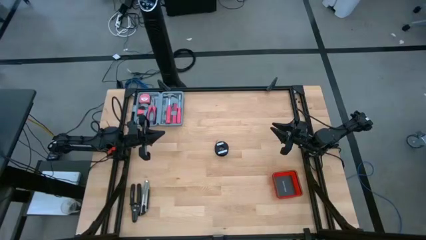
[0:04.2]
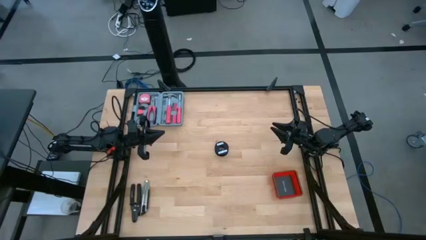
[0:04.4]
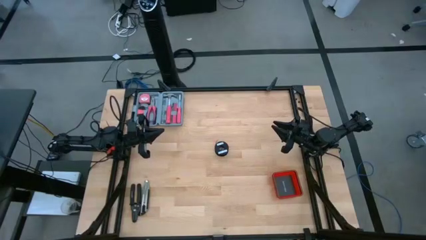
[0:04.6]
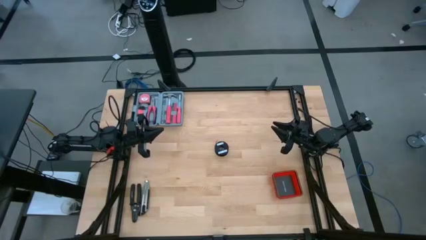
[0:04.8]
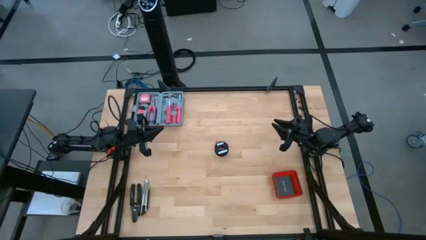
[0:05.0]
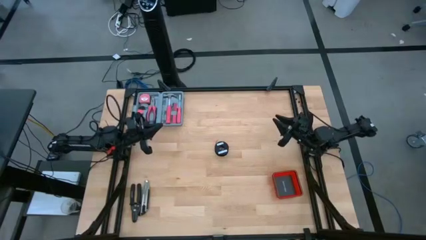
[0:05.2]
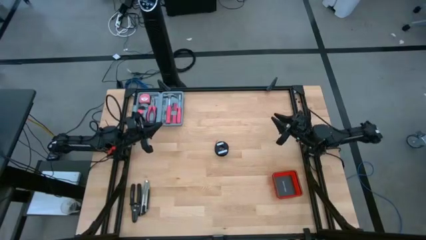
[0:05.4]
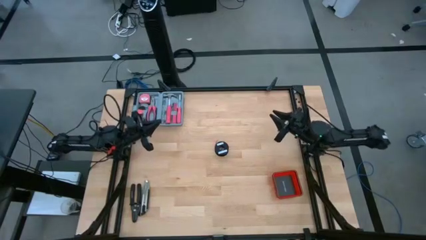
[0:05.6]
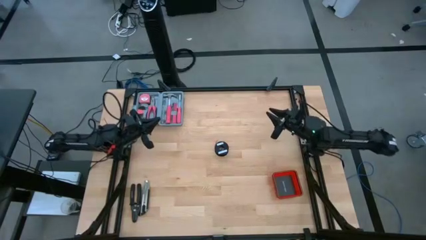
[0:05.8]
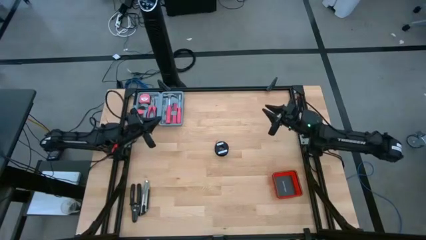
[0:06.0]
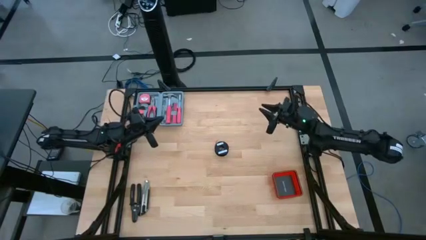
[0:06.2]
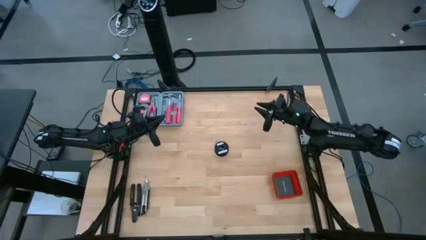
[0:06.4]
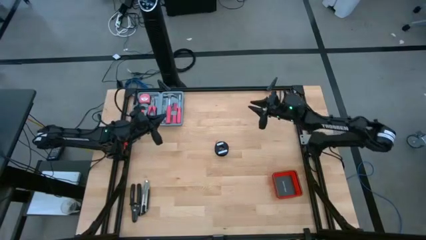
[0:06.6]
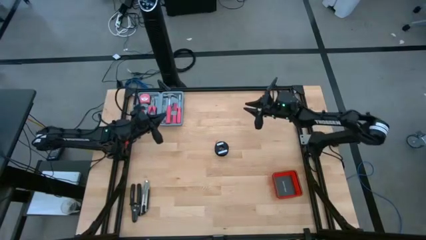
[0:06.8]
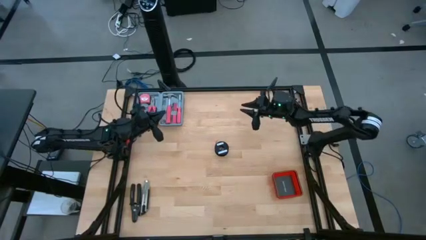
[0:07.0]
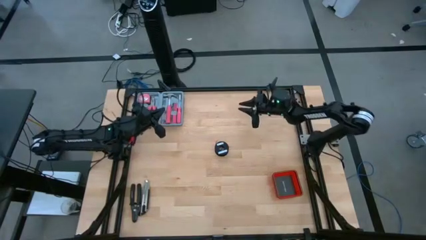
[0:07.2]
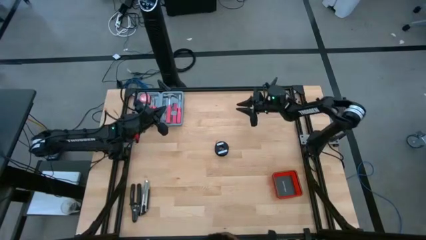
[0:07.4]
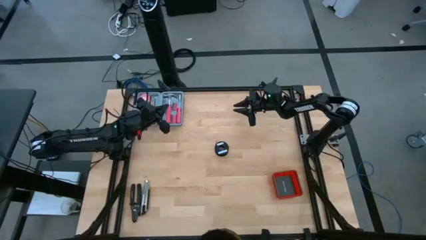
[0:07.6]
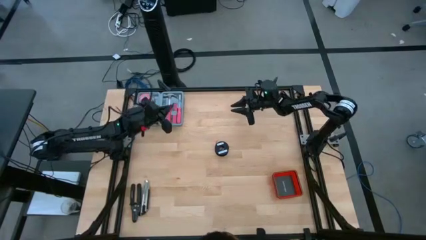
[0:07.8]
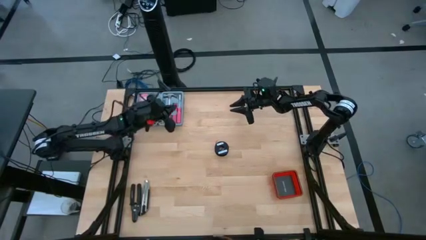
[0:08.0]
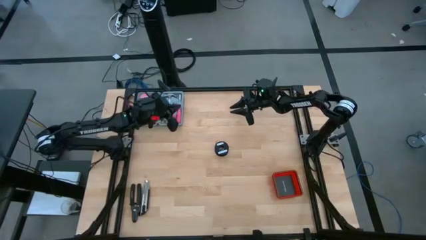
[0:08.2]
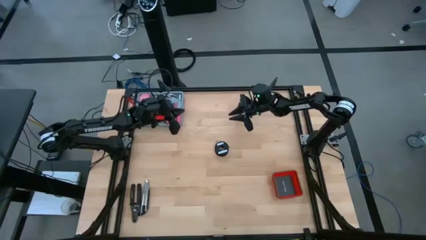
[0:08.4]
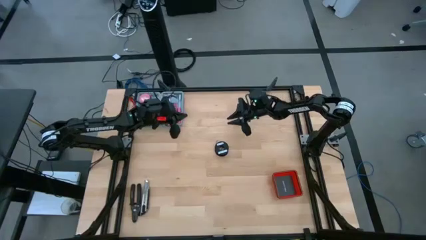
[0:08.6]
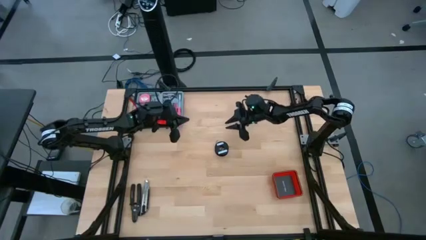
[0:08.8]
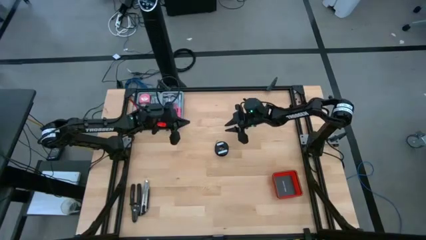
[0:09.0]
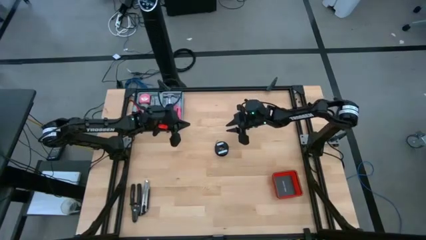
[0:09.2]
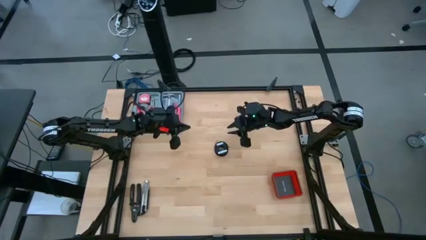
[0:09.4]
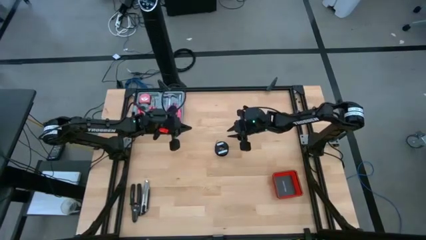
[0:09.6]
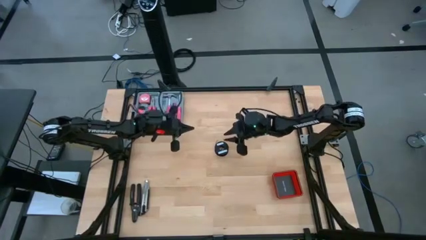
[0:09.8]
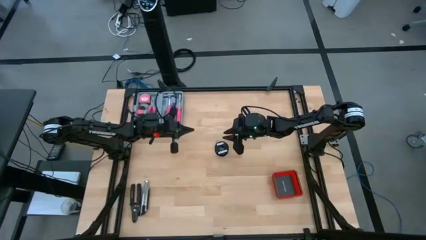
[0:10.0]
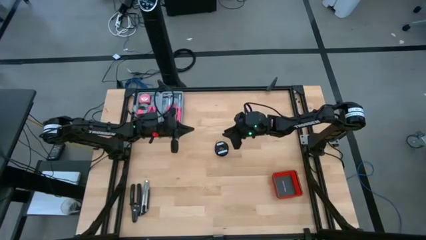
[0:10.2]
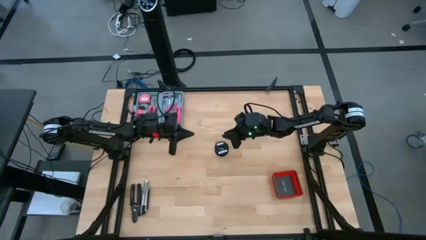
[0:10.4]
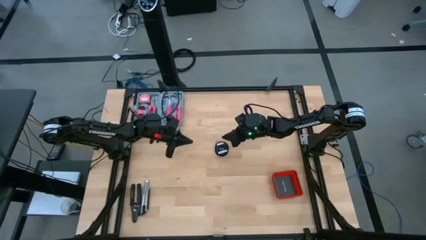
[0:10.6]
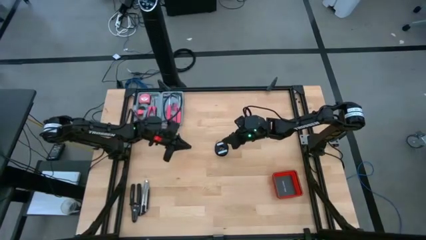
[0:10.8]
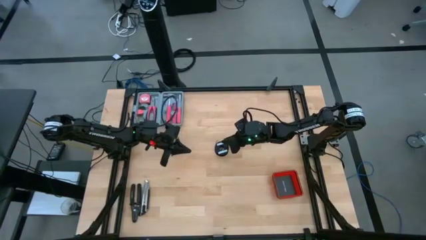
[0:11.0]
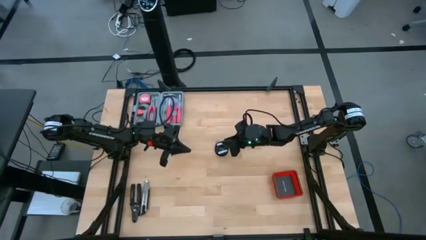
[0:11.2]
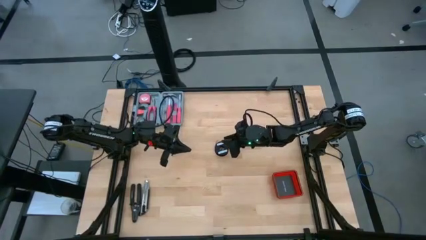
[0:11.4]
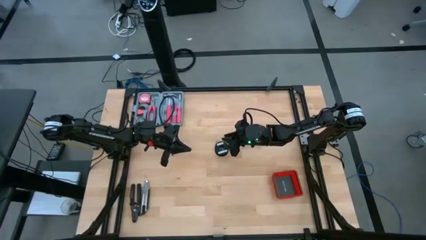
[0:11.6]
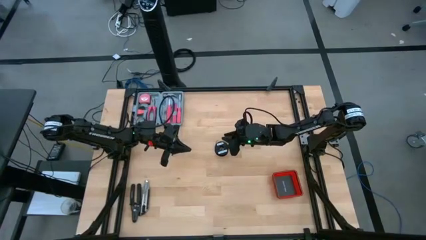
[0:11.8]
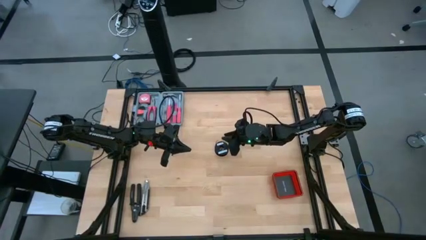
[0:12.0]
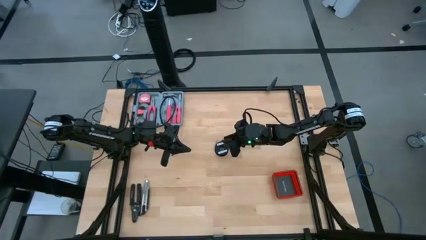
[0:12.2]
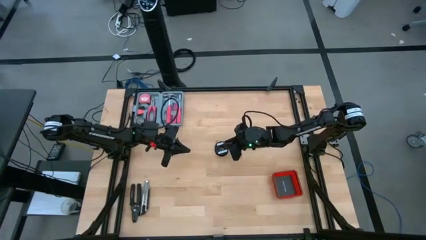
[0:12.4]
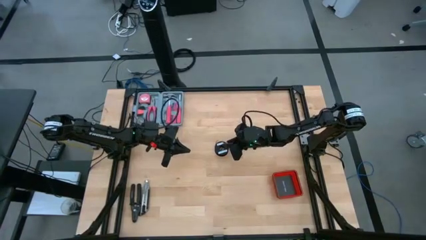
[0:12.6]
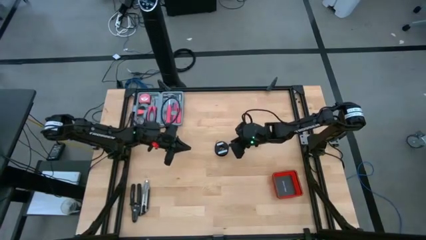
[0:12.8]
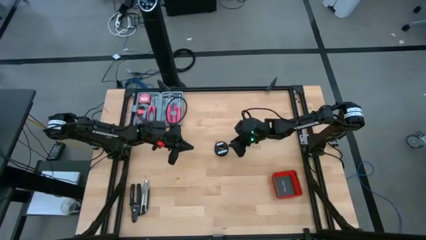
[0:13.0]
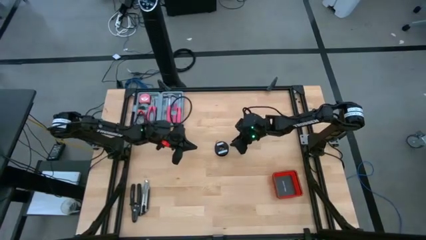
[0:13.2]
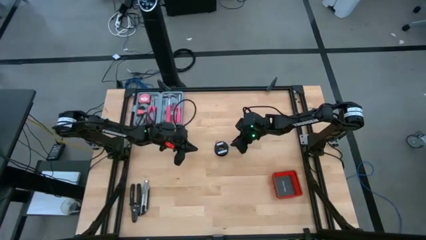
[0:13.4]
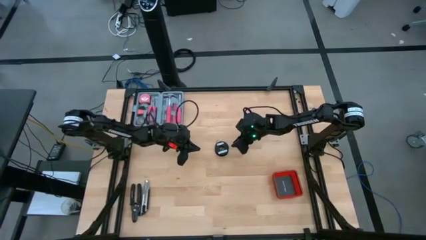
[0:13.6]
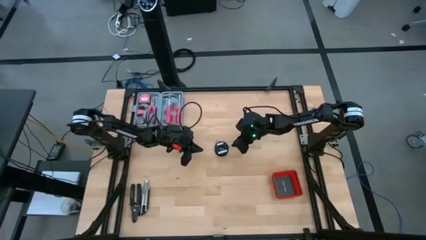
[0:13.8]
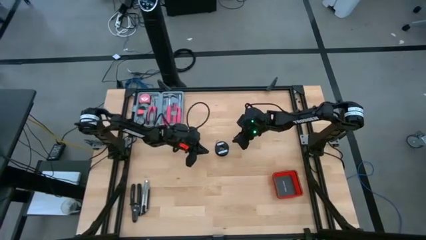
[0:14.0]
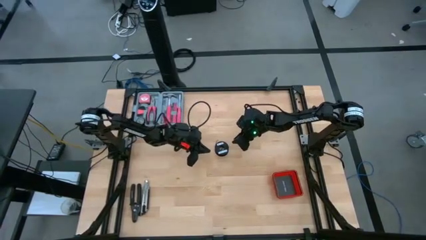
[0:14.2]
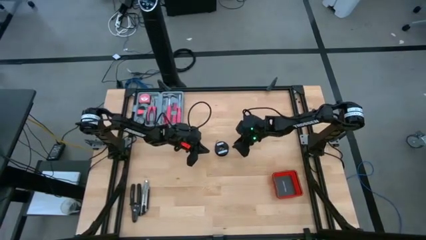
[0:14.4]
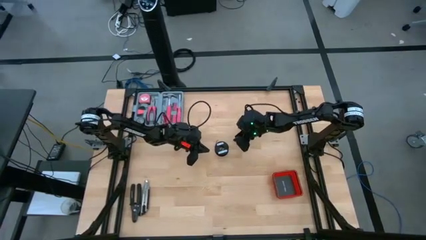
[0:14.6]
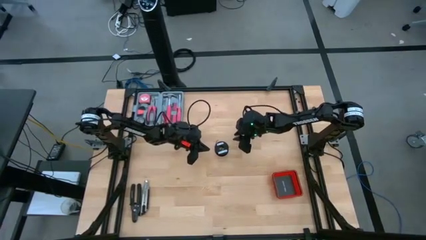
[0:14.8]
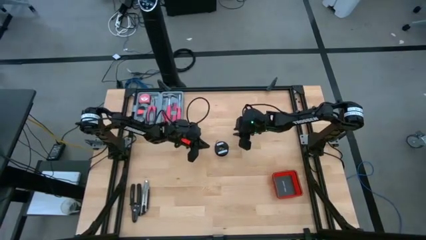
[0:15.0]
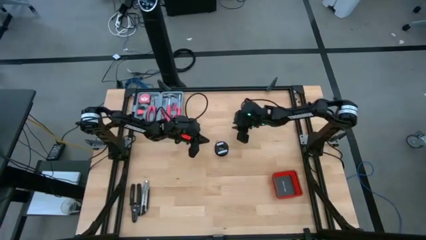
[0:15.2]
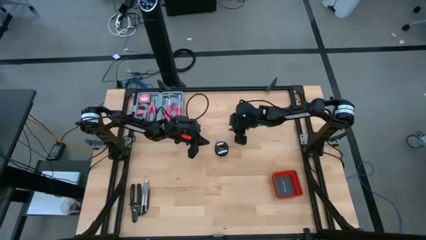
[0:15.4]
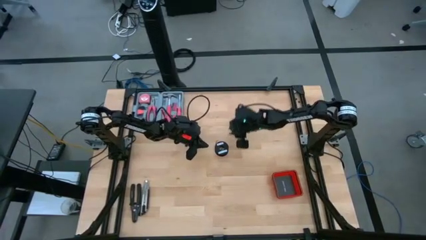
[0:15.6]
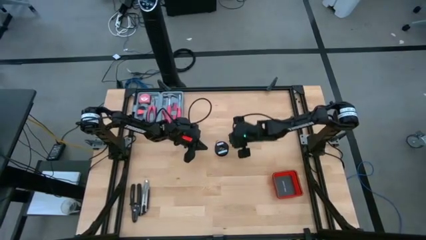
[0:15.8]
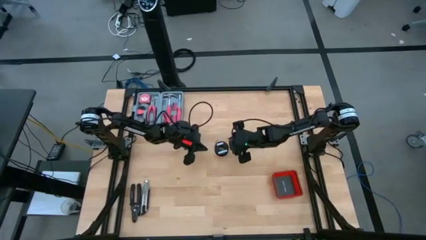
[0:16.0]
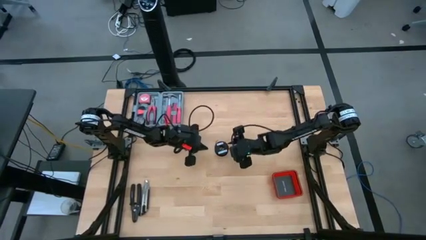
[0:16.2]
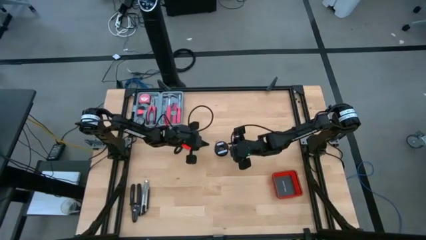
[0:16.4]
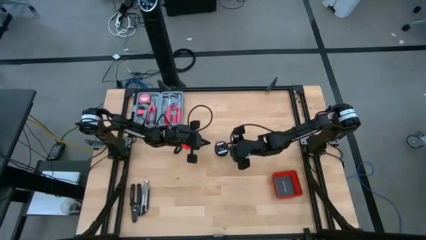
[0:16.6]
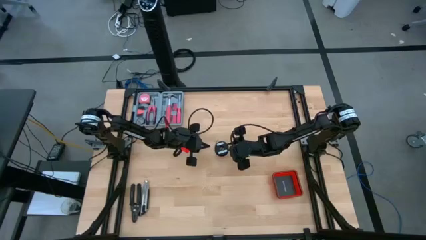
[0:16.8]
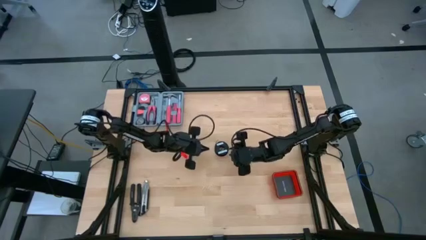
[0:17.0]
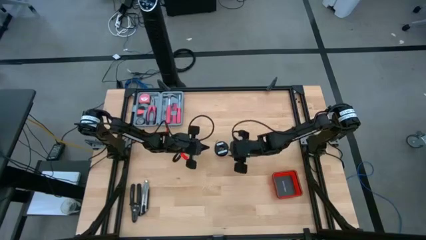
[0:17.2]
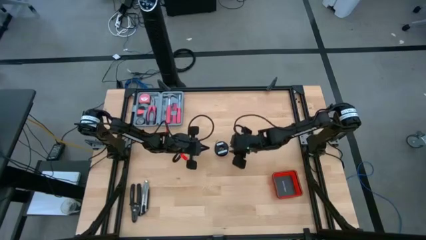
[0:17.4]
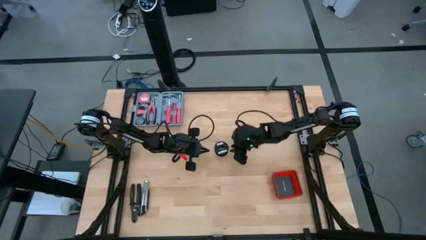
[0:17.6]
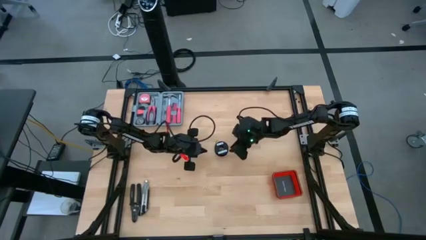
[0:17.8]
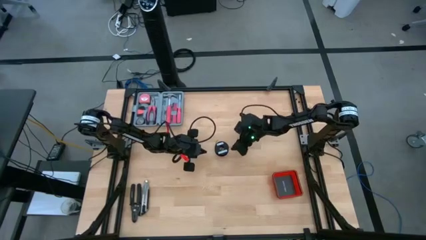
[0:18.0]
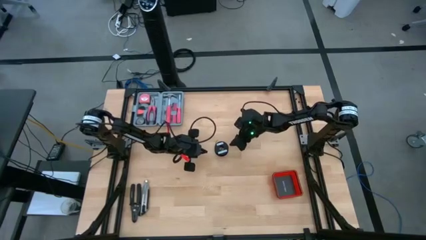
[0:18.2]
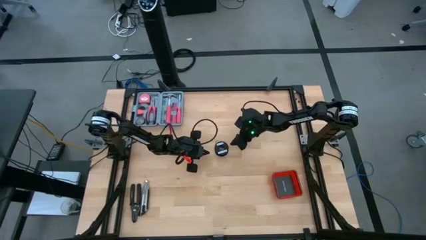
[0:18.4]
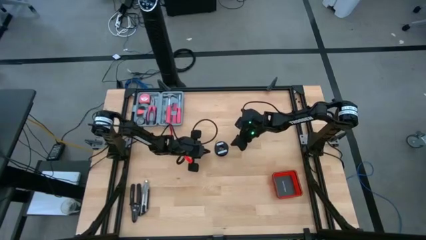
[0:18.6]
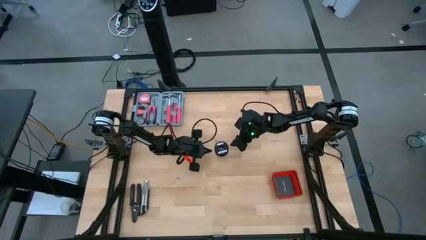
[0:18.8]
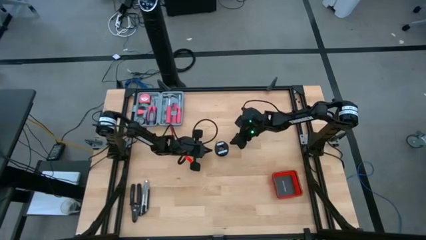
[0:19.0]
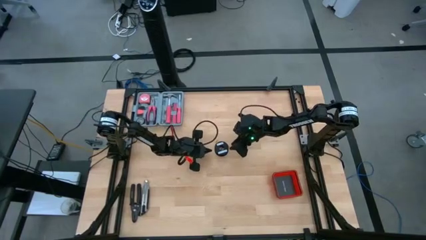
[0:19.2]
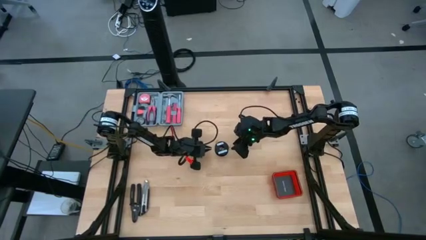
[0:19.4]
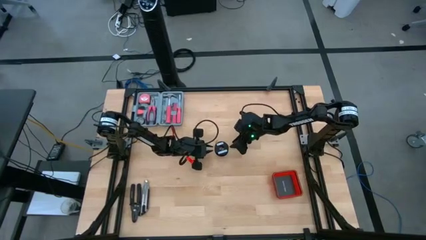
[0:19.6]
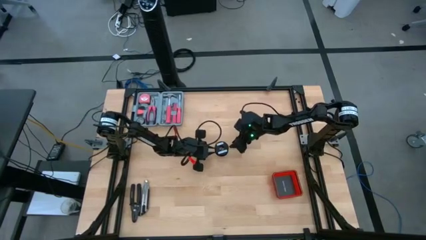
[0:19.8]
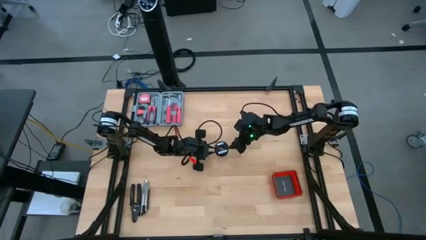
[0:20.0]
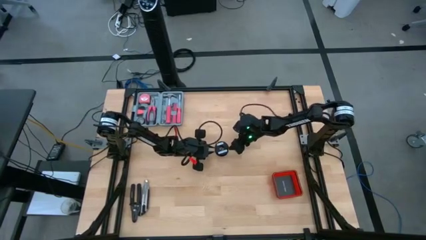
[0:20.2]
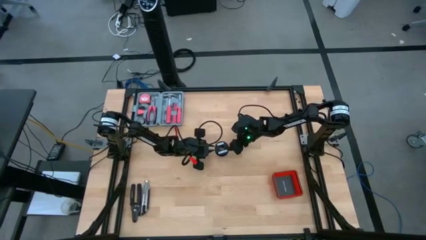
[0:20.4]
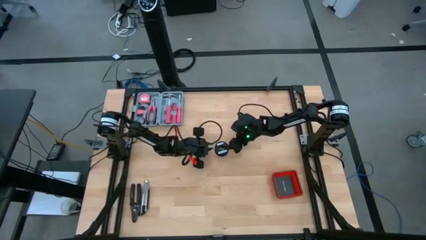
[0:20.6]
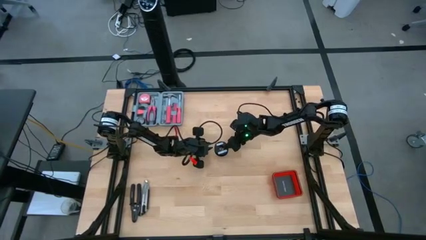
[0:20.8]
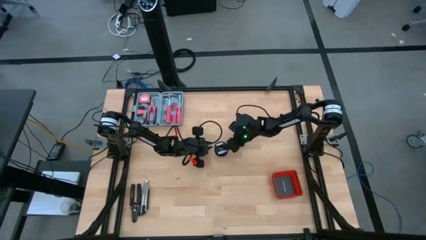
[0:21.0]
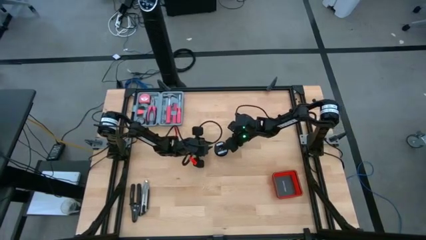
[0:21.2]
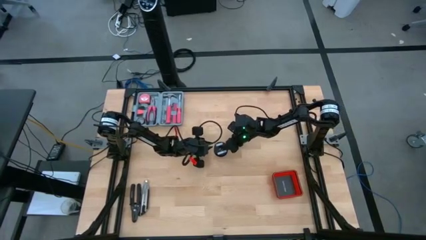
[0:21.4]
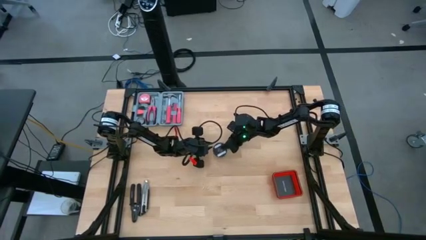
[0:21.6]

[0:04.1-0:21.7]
Task: Coil cords
Uncoil the red wire from the spool
